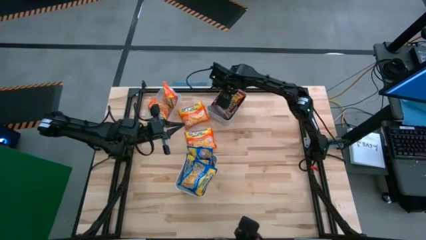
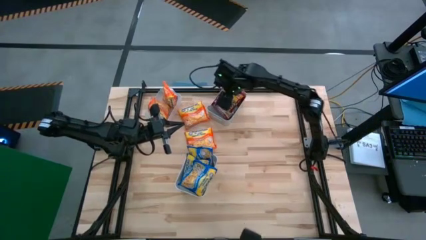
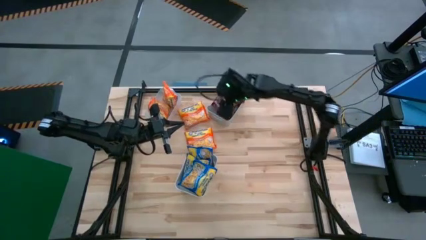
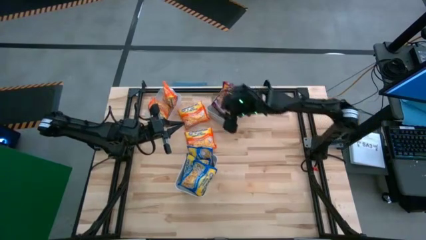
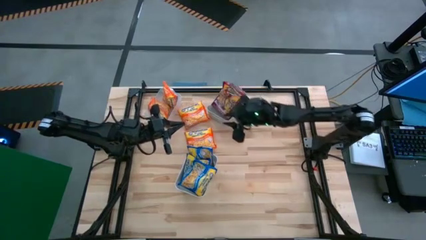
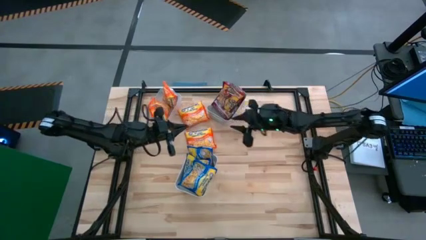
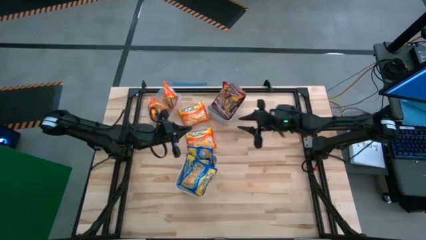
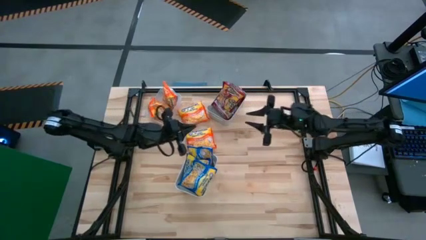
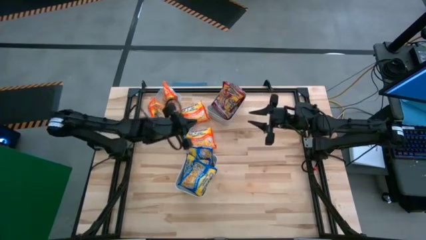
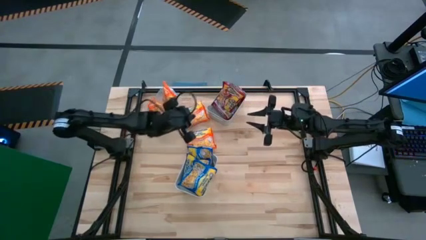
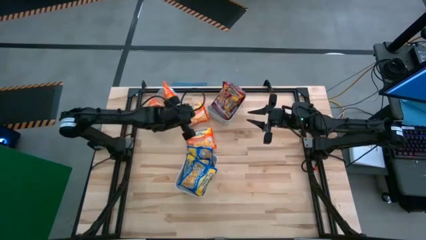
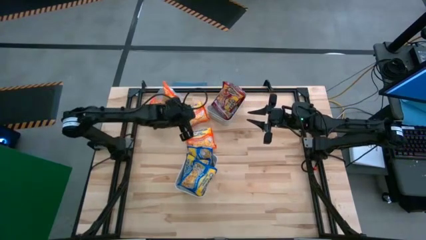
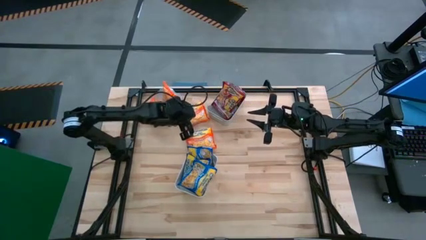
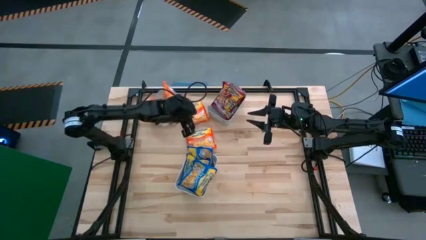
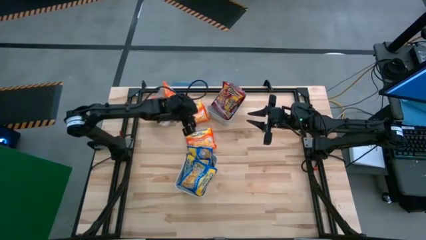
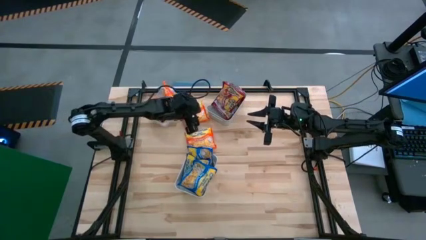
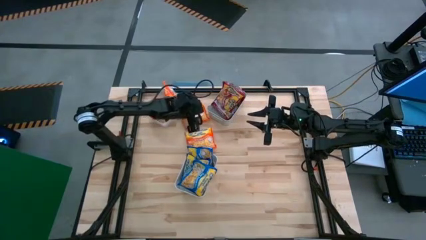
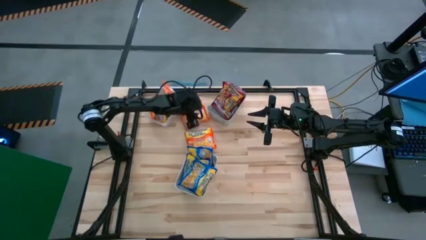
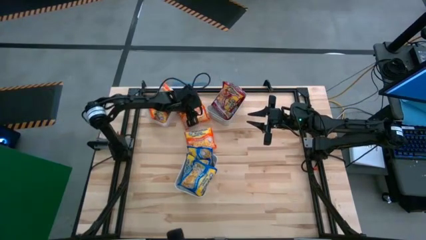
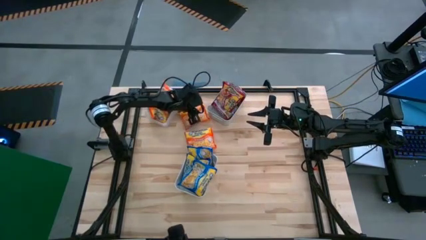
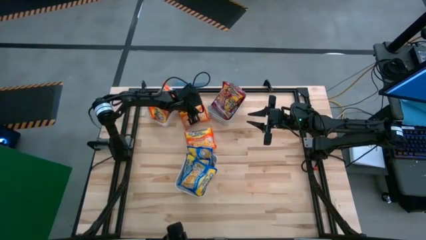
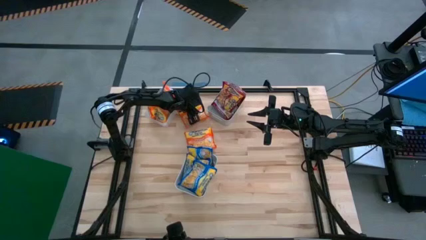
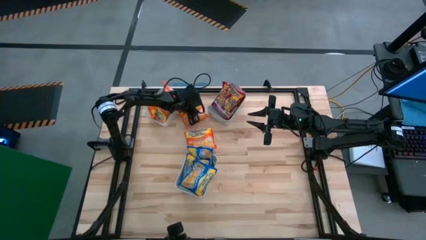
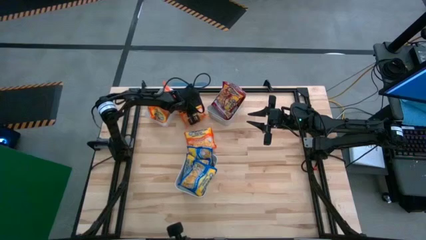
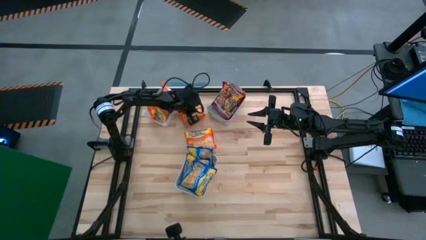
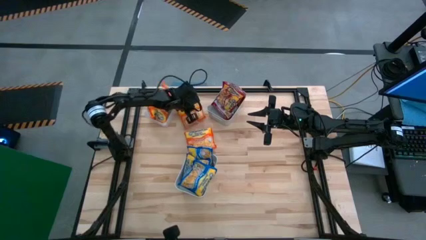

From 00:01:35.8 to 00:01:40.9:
Task: Sort Maruchan noodles
Put the orange noodle pack into the transparent bin

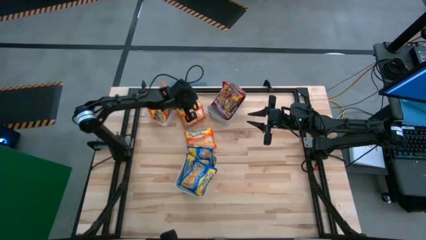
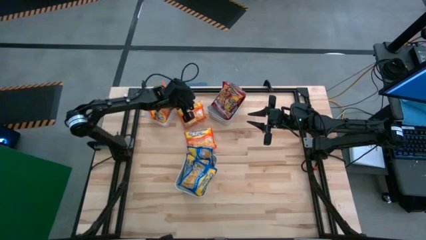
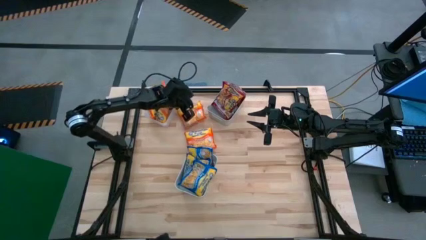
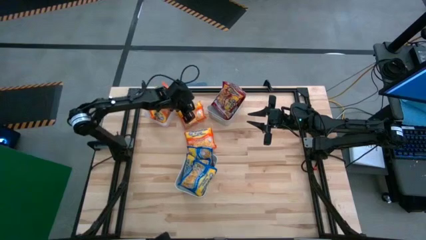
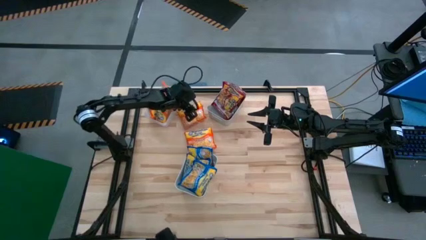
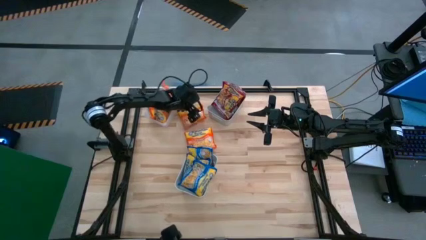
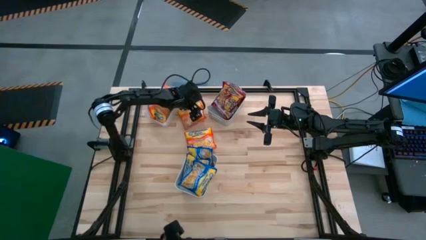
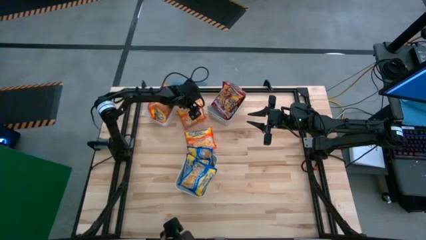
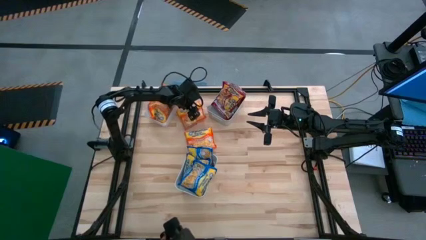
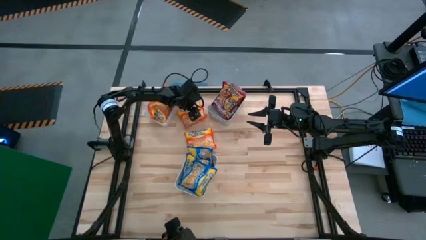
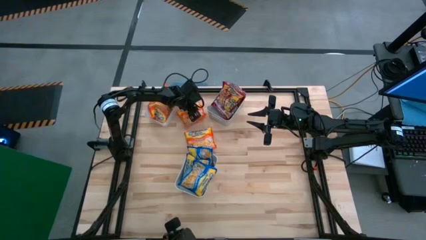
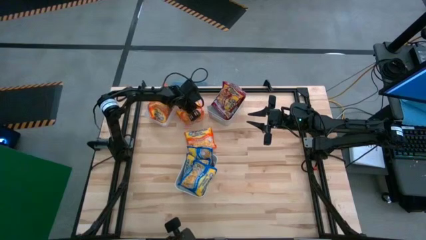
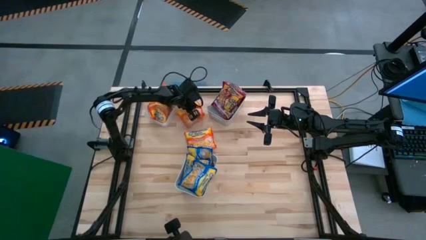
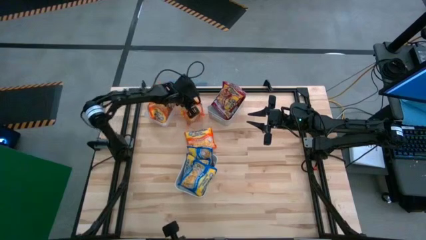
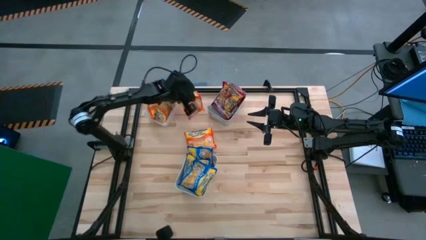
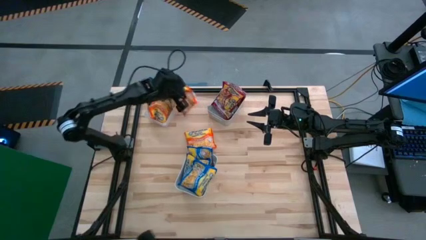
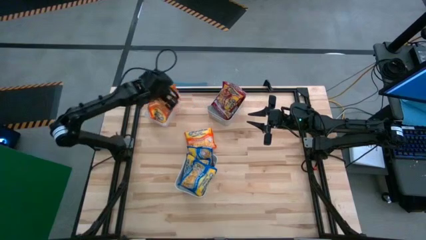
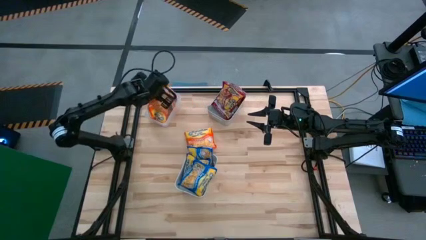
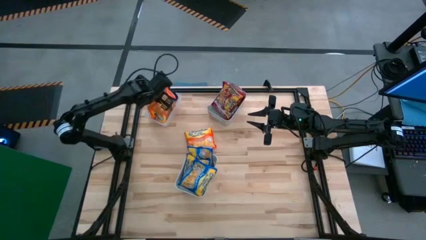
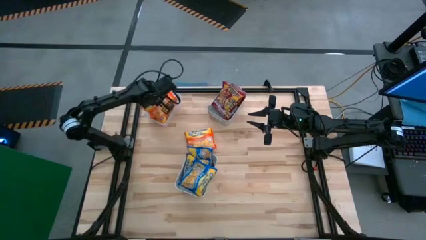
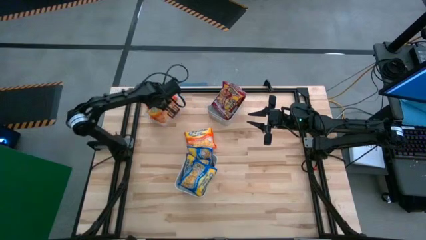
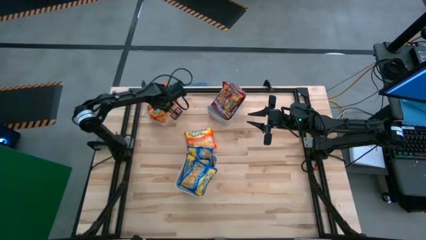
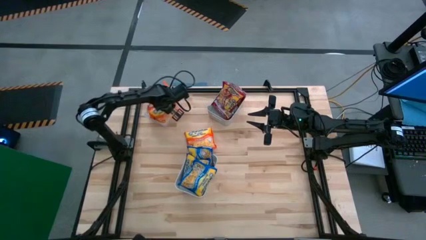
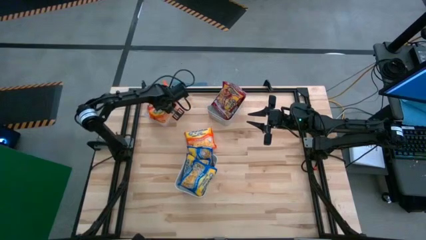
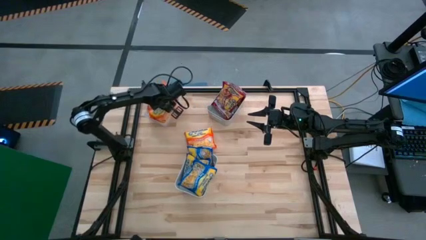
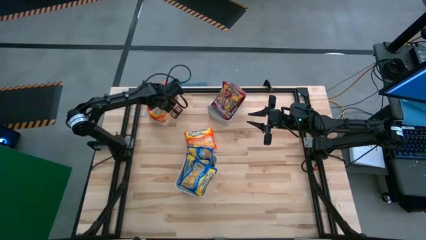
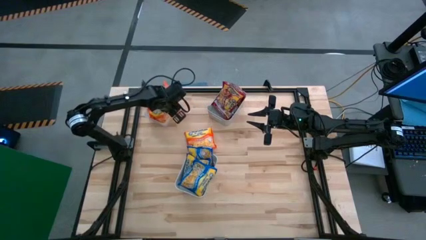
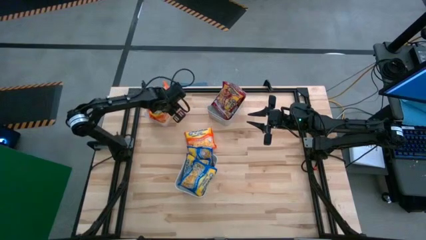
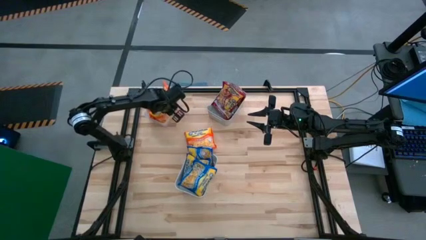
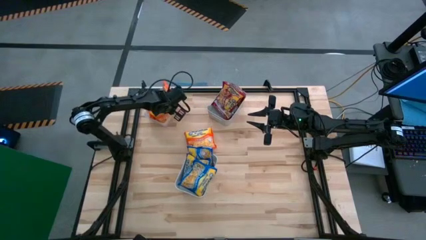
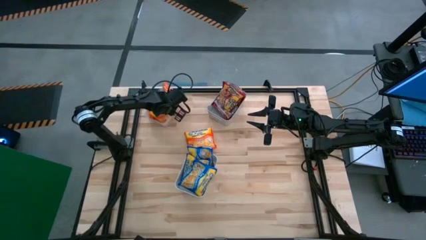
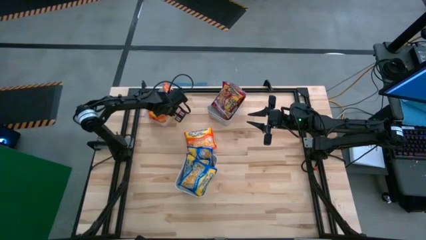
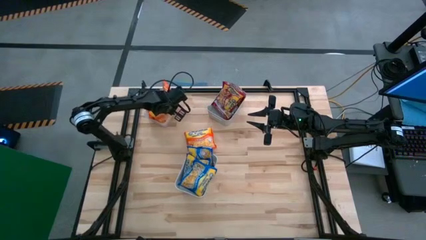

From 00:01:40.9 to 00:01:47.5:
Put the orange noodle pack into the transparent bin
